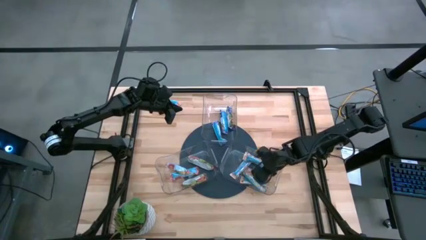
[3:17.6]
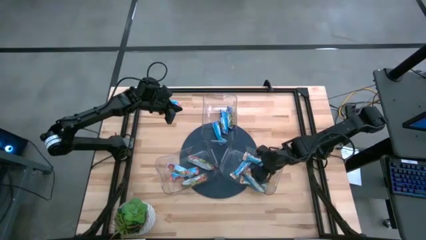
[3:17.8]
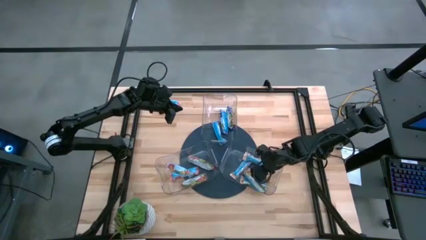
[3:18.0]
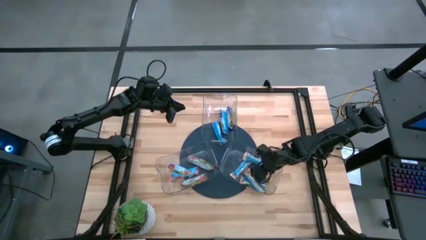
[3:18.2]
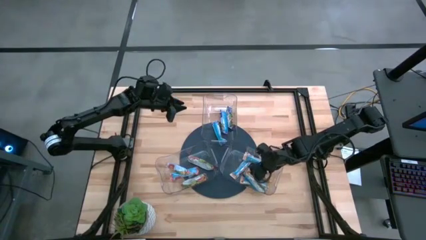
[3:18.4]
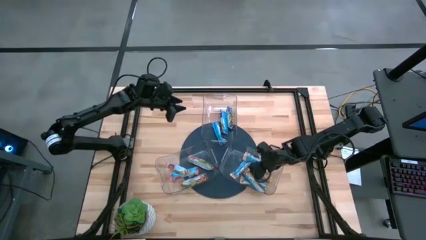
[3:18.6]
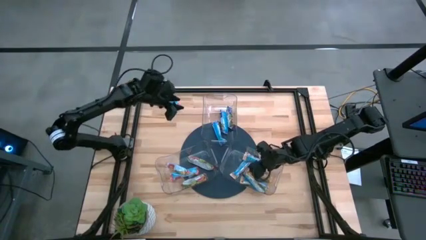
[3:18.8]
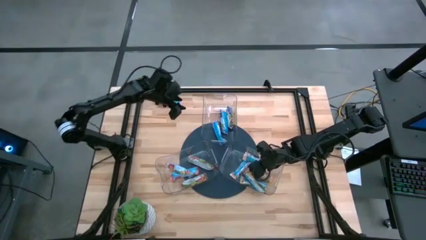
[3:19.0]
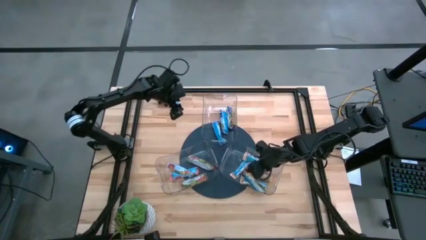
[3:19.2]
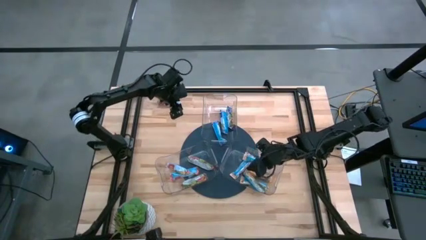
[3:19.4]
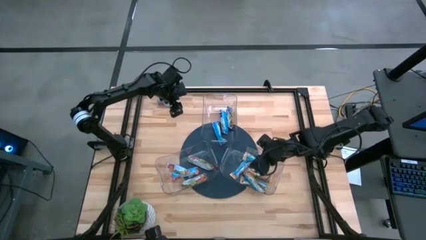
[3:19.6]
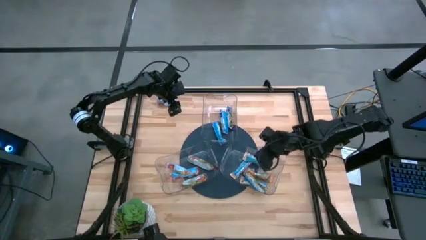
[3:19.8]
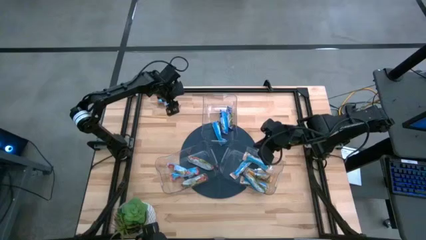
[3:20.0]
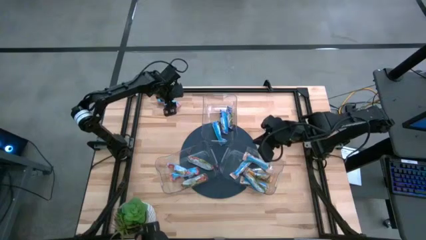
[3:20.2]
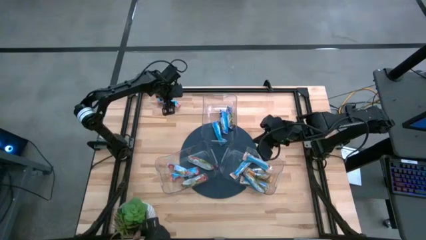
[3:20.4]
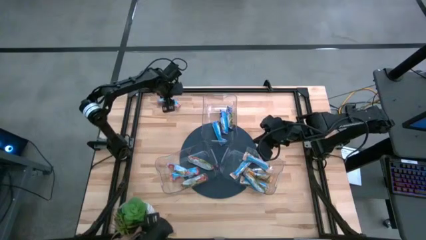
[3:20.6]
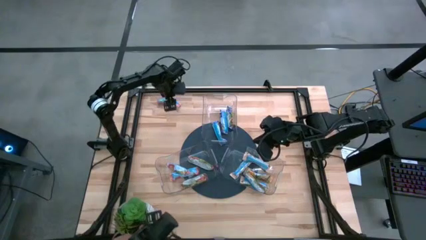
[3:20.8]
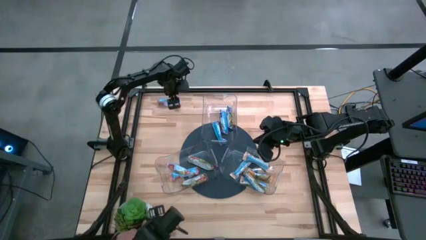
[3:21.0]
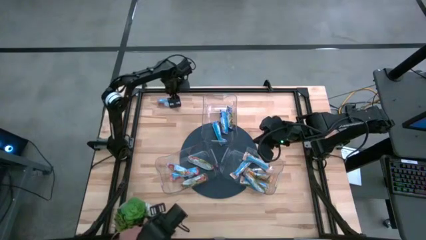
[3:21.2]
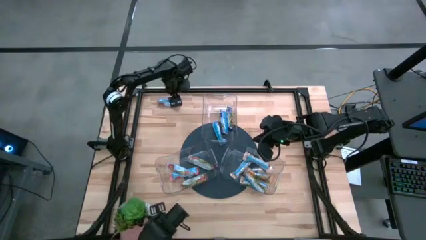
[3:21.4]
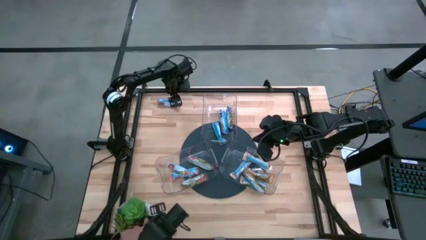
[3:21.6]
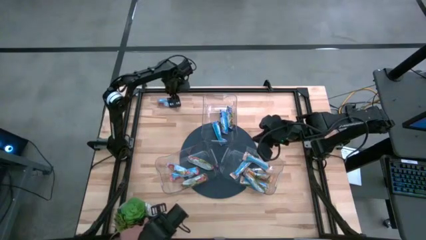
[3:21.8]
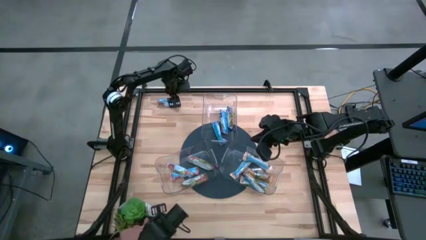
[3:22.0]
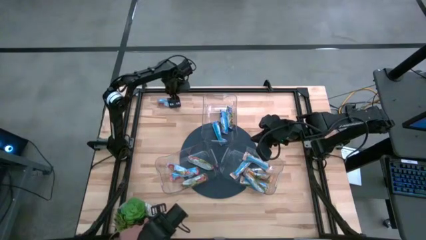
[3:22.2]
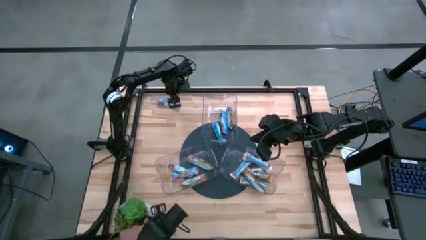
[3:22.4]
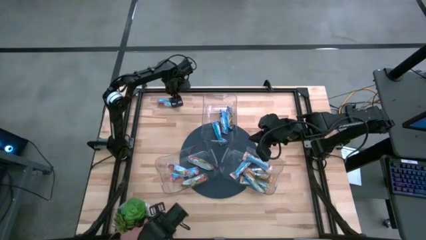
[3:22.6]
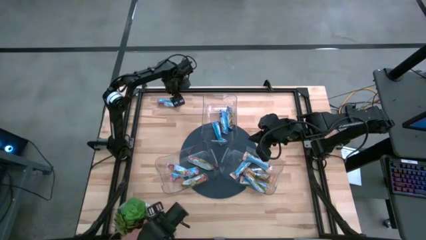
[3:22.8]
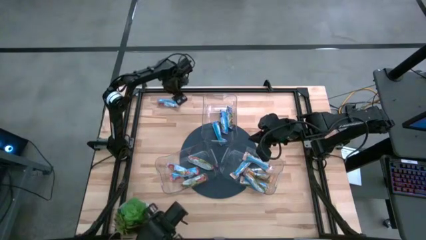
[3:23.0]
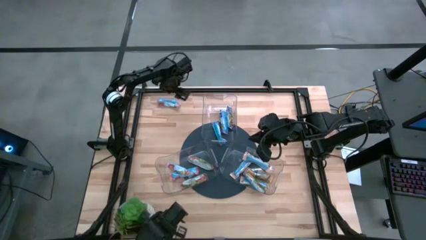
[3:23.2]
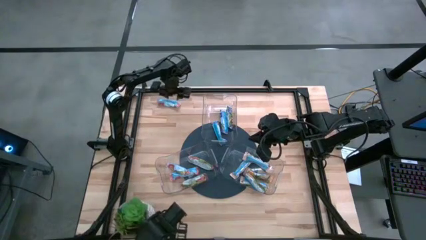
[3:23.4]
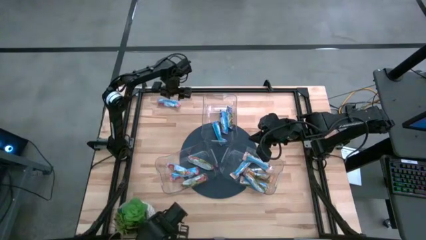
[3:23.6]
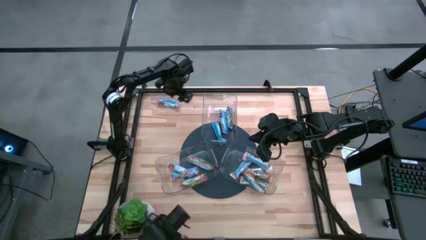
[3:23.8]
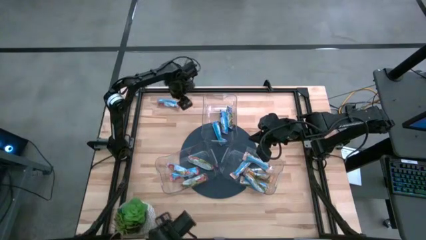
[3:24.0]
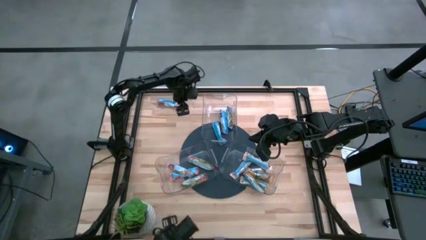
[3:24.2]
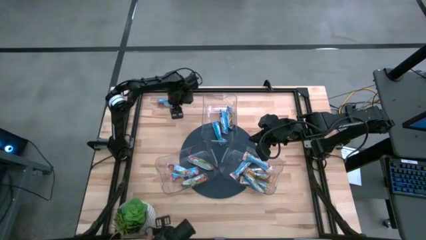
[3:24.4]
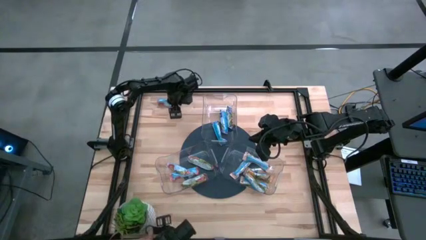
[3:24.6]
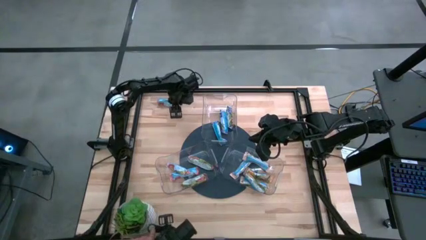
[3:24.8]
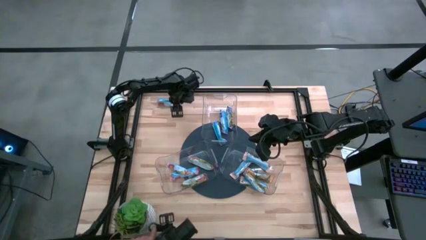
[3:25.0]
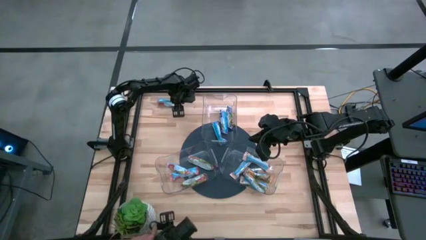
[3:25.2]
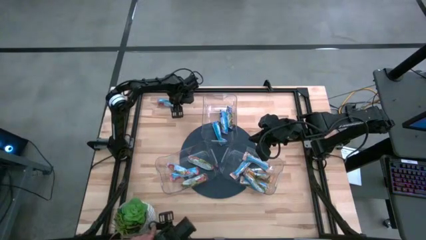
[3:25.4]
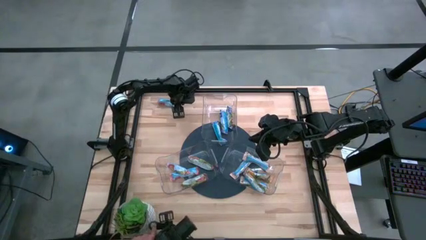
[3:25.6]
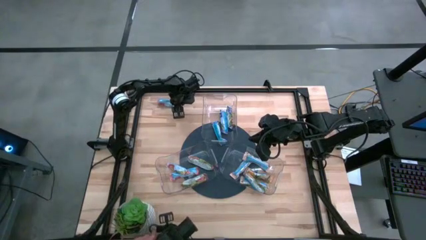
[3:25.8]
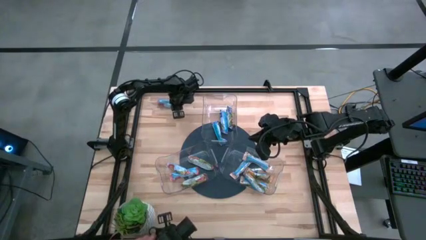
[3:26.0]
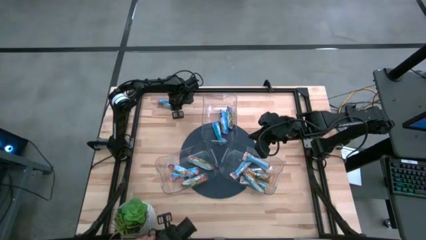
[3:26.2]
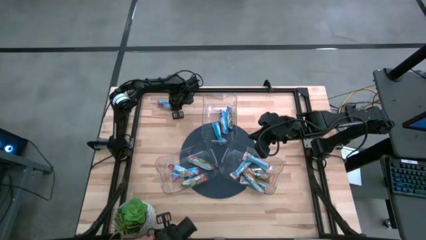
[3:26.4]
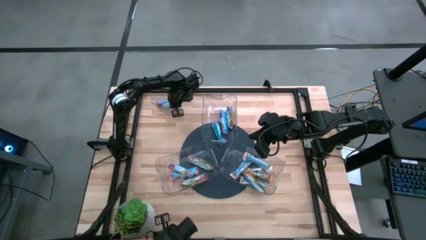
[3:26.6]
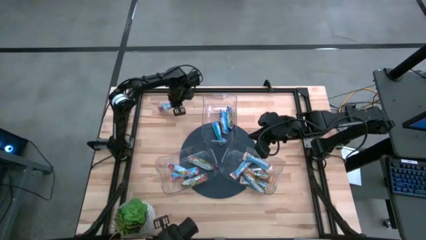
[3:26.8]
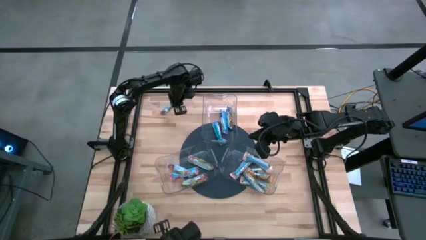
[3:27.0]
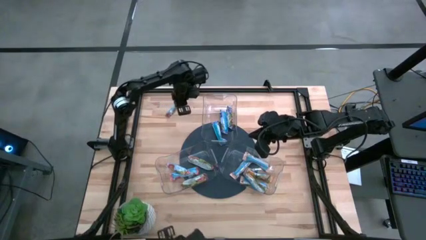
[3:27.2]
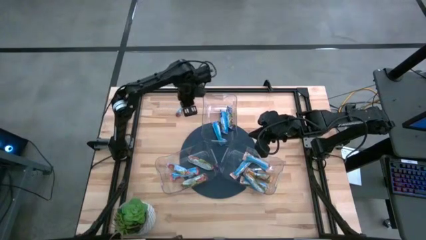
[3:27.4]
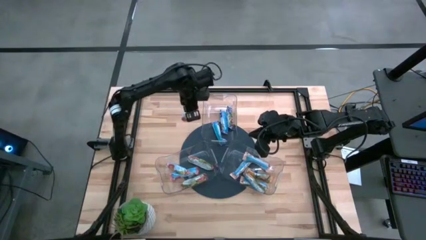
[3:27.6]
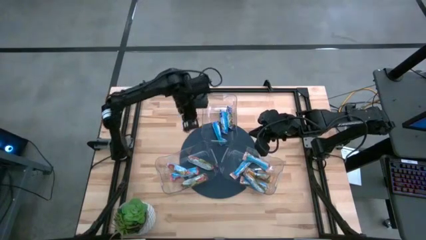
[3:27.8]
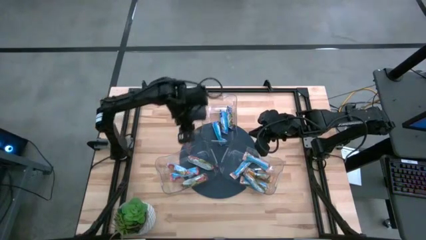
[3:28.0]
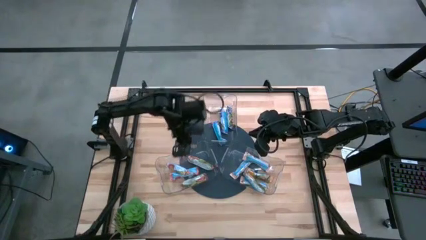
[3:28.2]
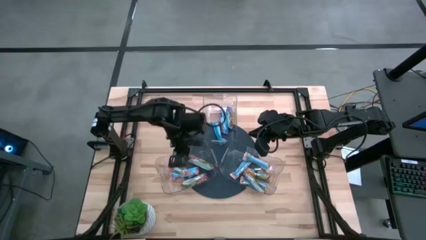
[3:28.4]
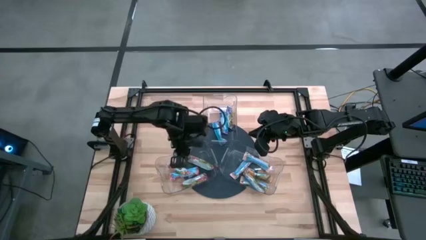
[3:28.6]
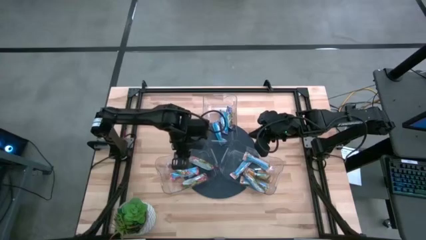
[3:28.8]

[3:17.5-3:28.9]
Task: Pick and place Granola Bars by type
Put the red granola bar into the left transparent bin

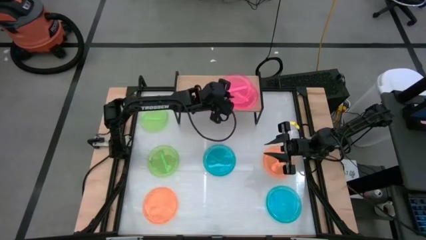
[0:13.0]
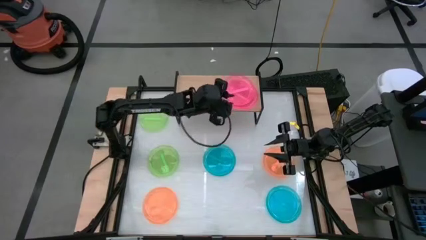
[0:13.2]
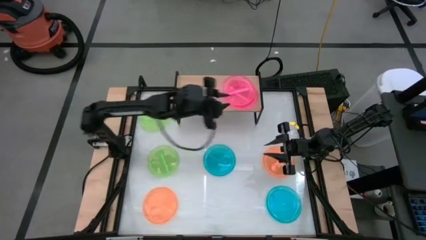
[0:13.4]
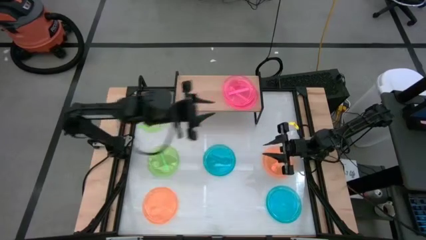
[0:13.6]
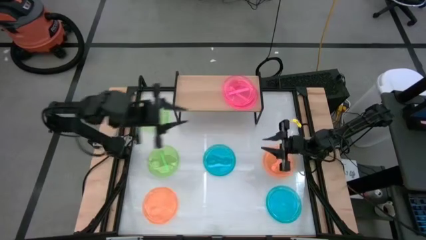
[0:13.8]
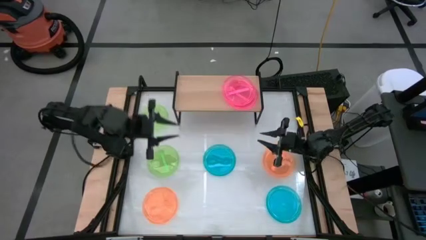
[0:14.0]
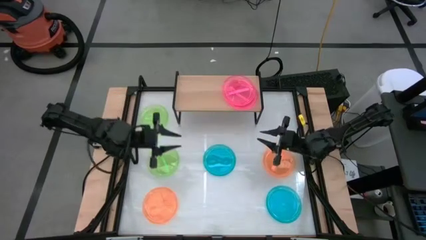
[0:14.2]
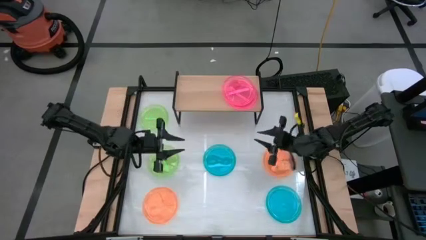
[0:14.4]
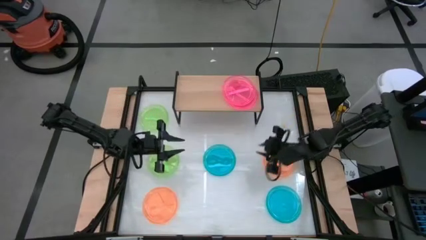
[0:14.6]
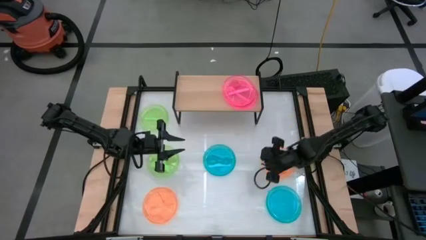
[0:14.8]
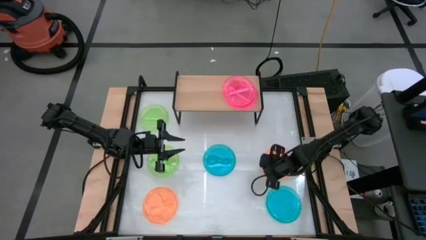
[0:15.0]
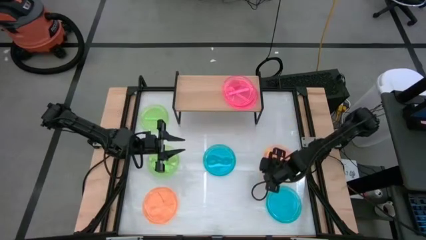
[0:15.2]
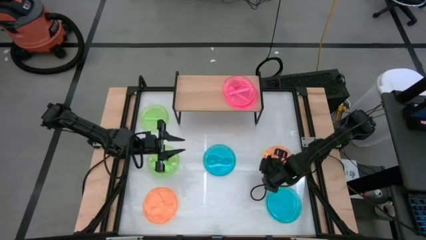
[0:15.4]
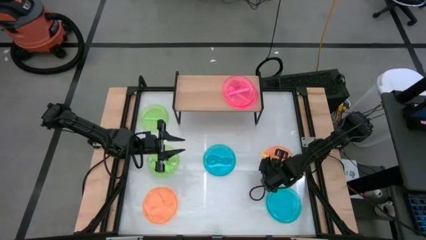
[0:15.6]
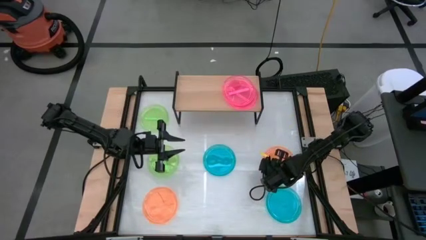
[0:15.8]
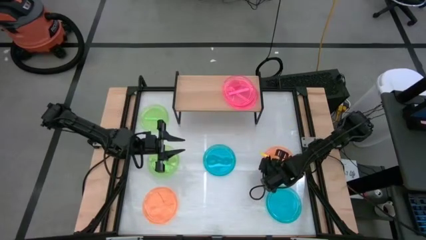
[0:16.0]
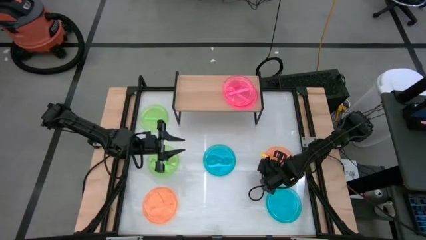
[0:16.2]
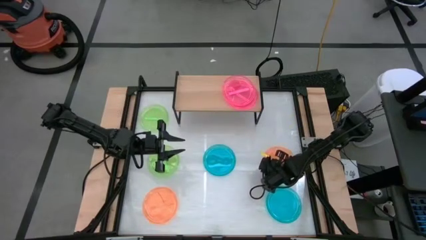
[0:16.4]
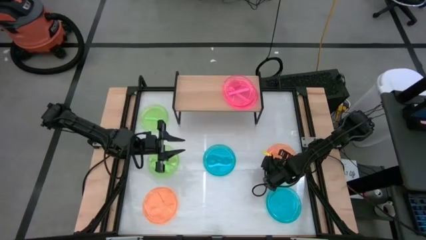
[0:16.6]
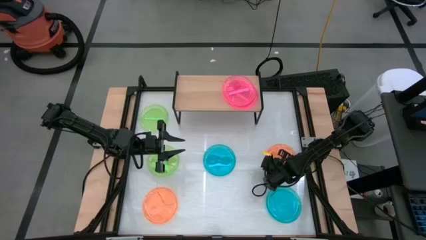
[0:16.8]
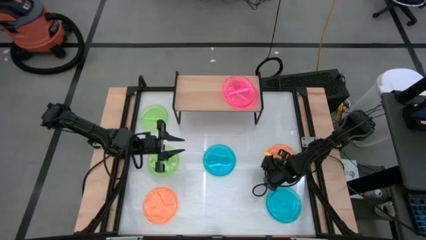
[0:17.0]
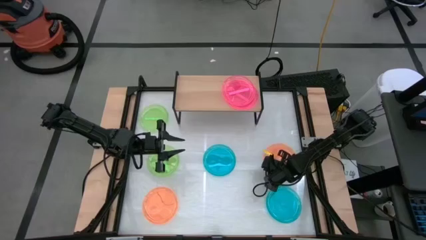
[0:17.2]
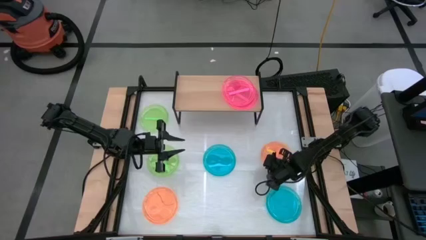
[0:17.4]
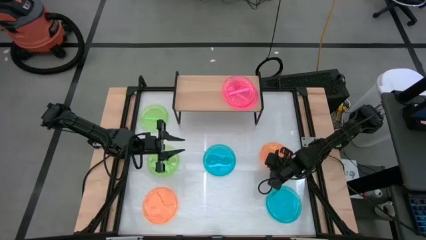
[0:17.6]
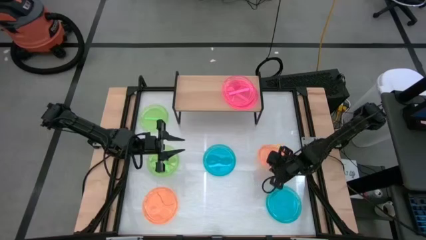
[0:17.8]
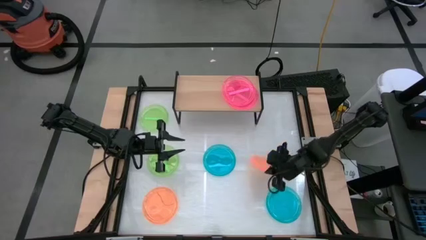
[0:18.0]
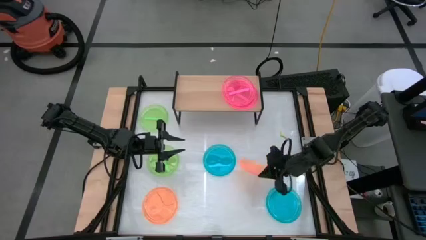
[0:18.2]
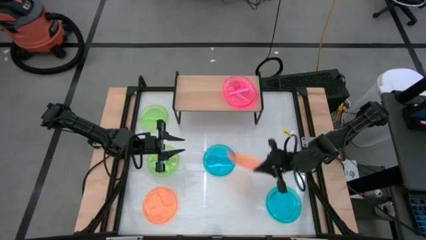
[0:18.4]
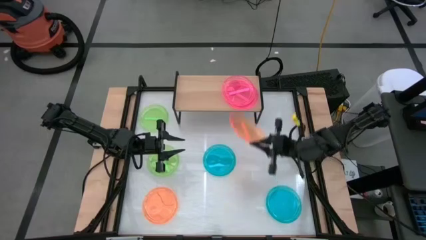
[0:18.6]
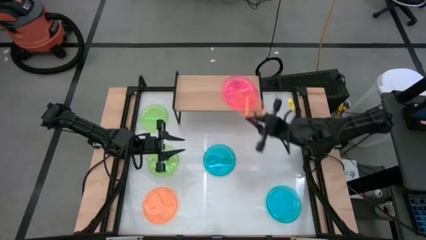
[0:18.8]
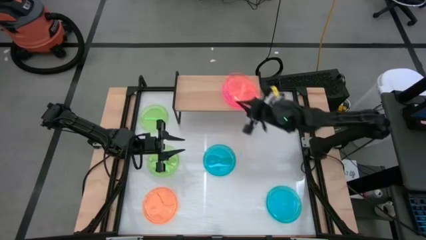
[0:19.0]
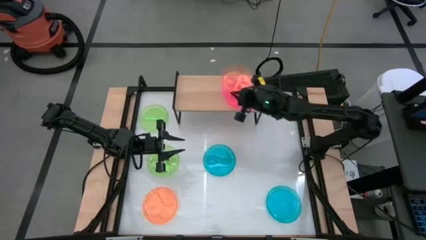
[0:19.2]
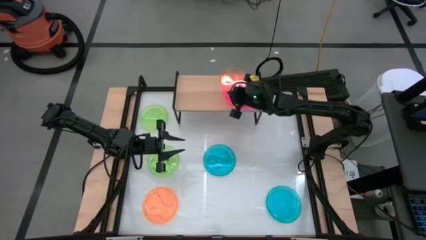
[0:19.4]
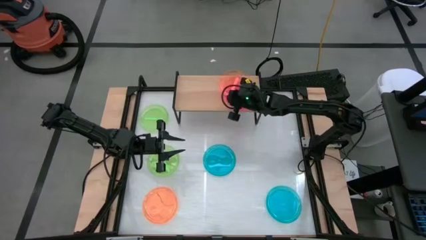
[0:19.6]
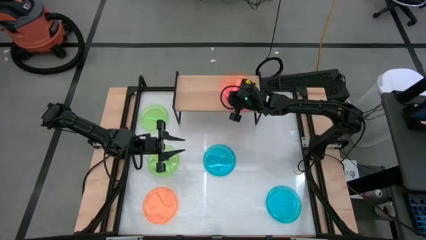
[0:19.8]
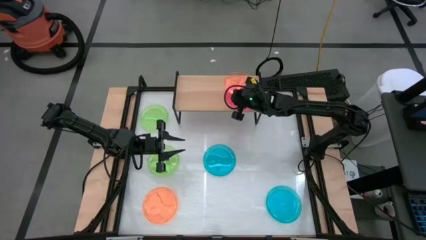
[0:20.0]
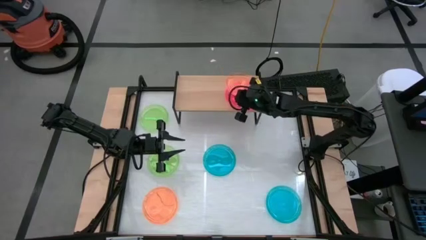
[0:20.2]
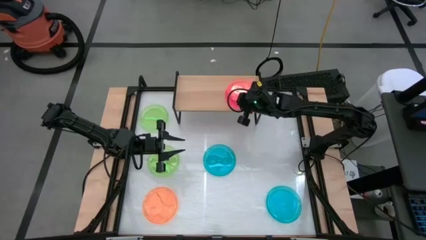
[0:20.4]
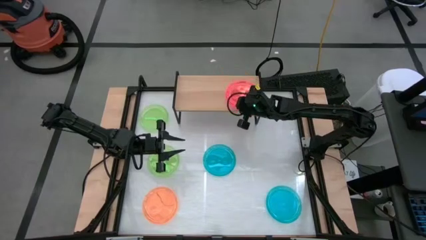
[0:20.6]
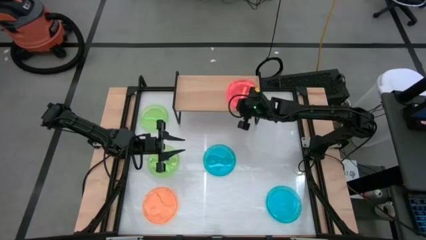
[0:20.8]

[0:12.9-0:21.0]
Task: Place and stack plates onto a shelf
Stack the right orange plate on top of the pink plate on the shelf
